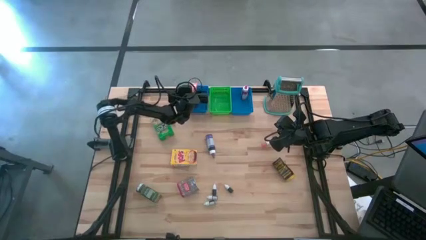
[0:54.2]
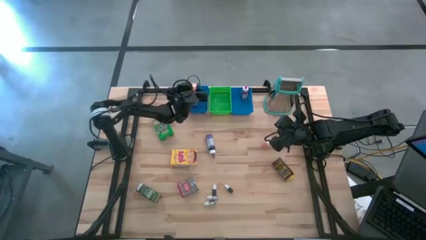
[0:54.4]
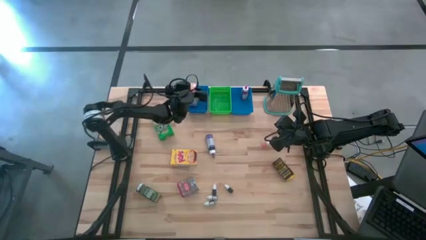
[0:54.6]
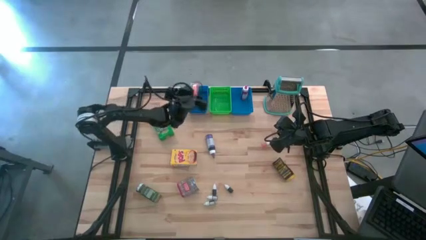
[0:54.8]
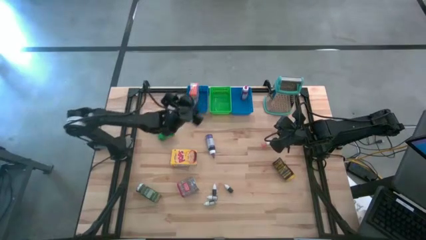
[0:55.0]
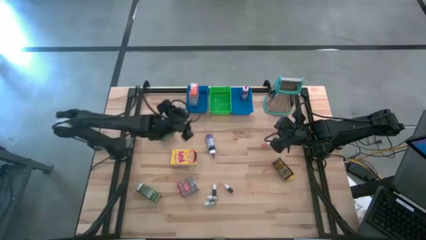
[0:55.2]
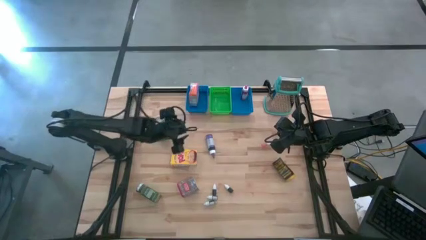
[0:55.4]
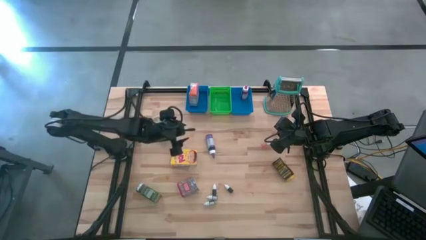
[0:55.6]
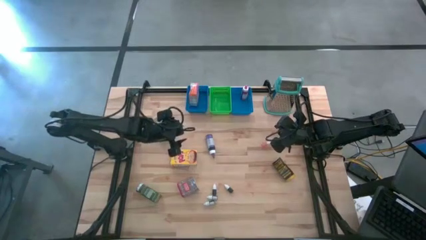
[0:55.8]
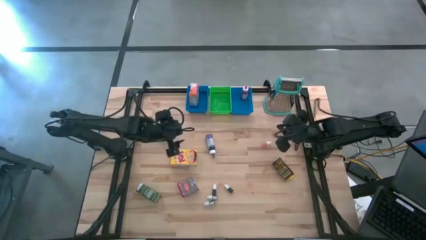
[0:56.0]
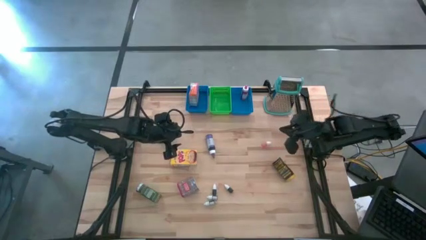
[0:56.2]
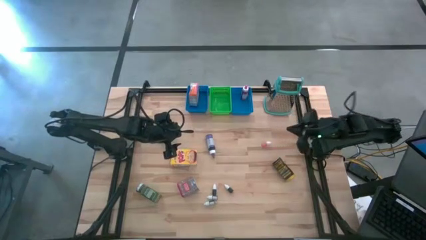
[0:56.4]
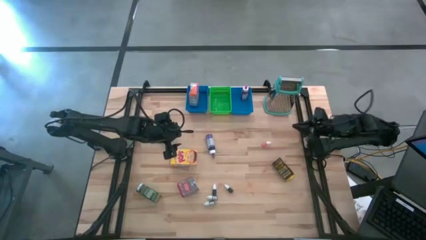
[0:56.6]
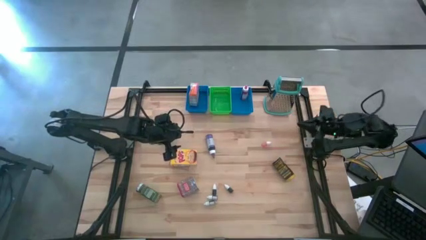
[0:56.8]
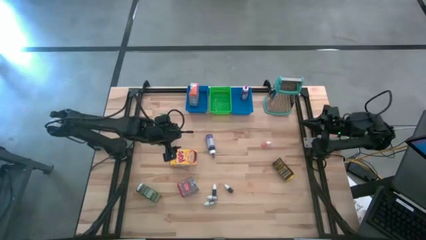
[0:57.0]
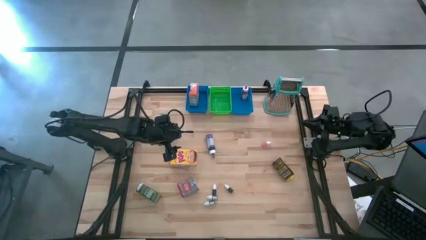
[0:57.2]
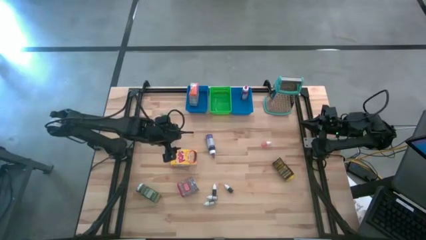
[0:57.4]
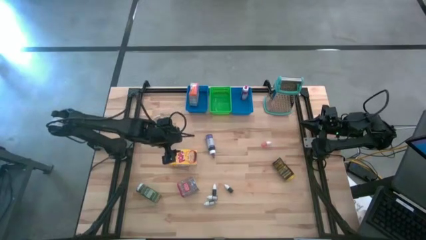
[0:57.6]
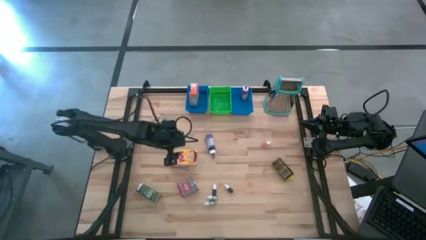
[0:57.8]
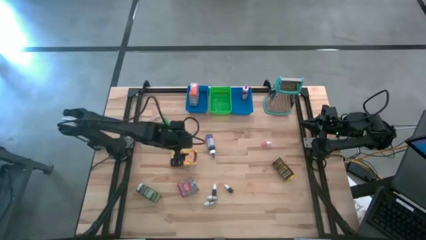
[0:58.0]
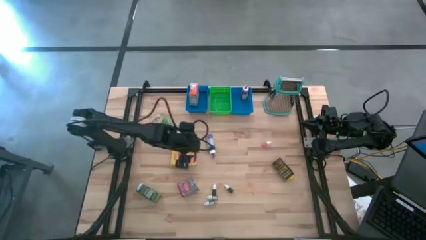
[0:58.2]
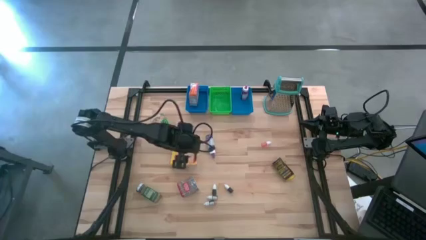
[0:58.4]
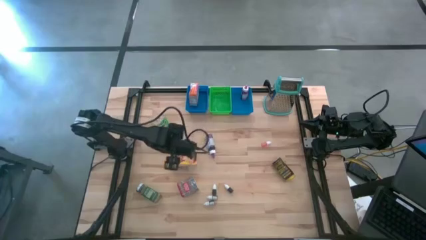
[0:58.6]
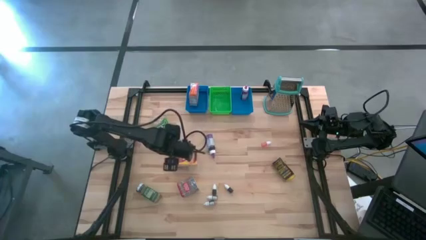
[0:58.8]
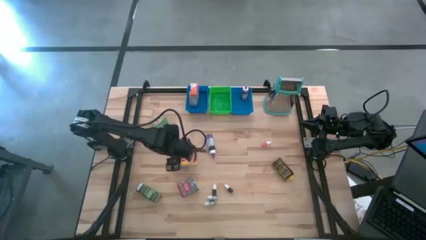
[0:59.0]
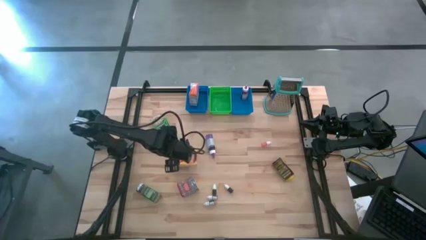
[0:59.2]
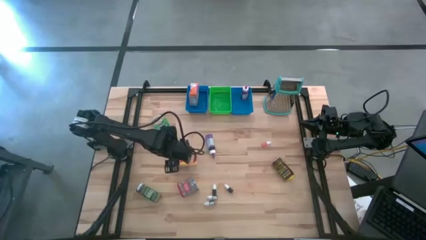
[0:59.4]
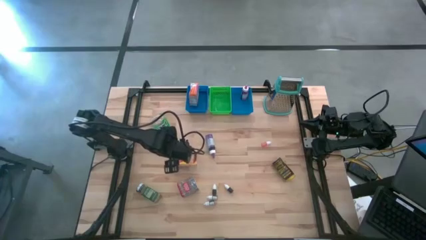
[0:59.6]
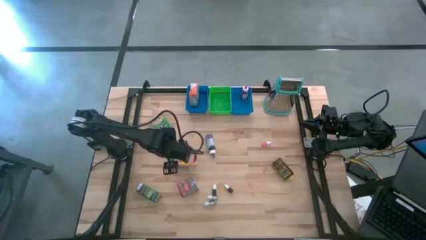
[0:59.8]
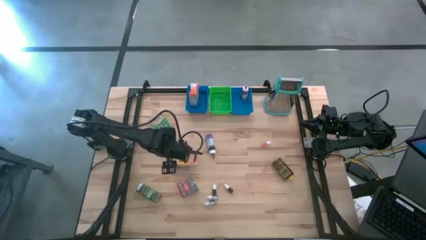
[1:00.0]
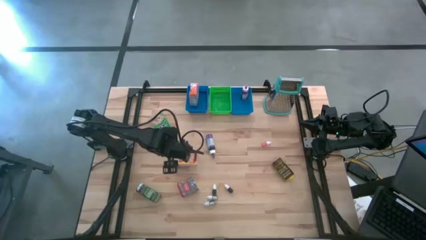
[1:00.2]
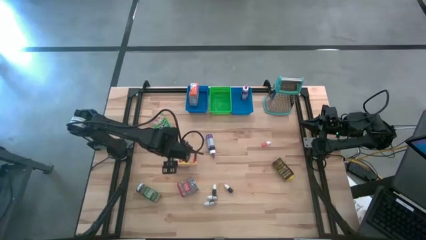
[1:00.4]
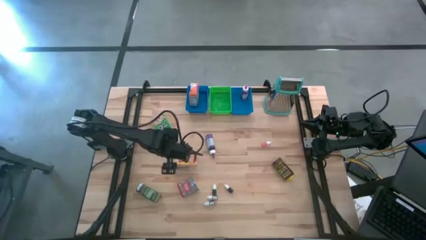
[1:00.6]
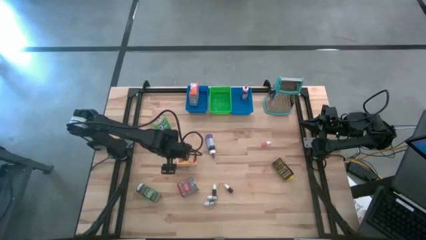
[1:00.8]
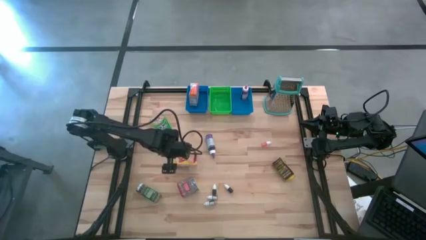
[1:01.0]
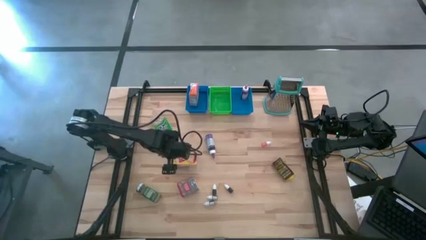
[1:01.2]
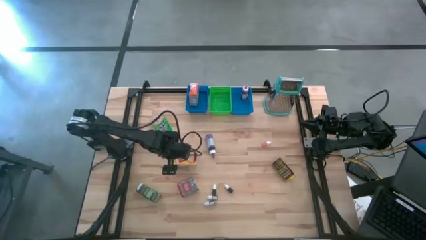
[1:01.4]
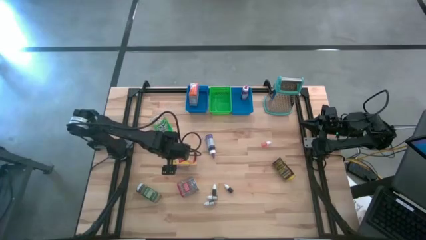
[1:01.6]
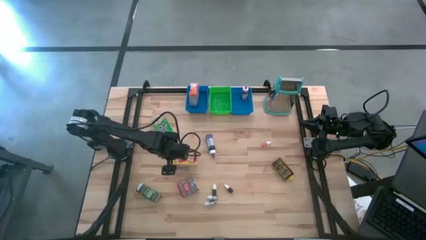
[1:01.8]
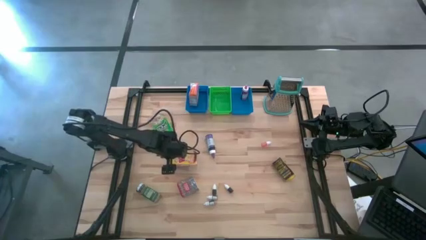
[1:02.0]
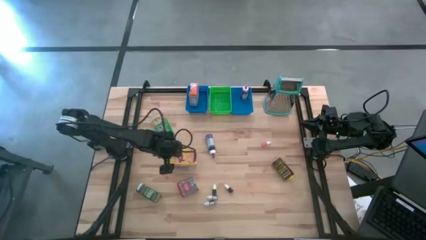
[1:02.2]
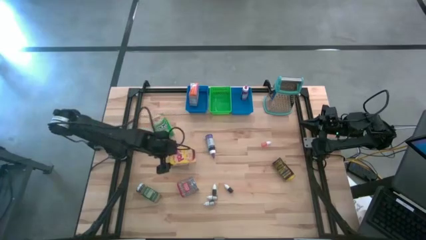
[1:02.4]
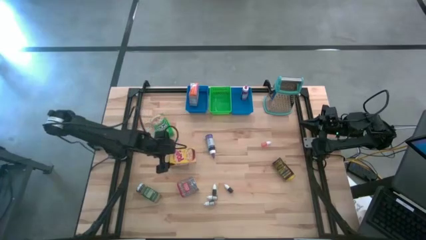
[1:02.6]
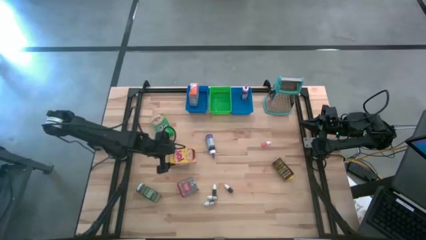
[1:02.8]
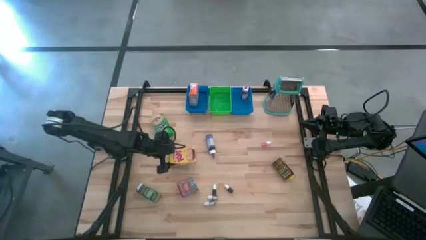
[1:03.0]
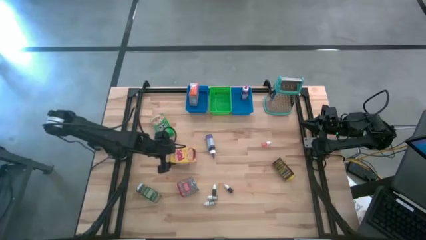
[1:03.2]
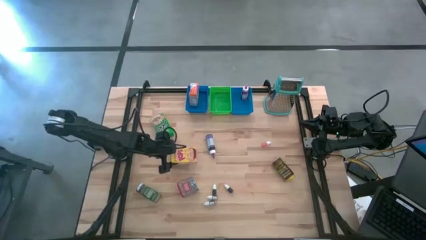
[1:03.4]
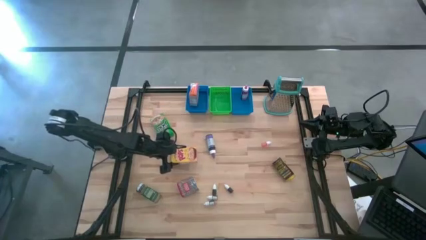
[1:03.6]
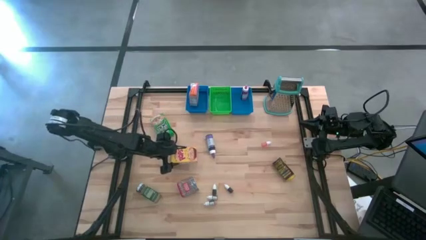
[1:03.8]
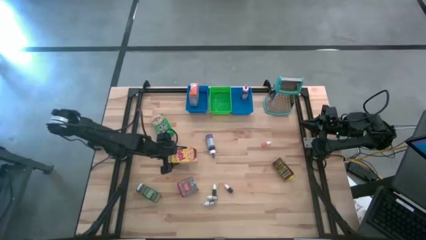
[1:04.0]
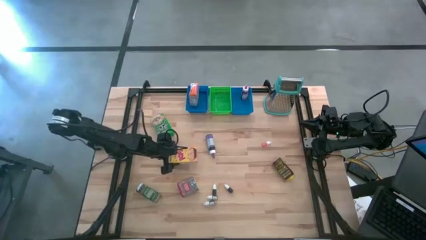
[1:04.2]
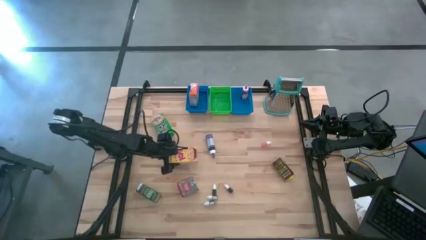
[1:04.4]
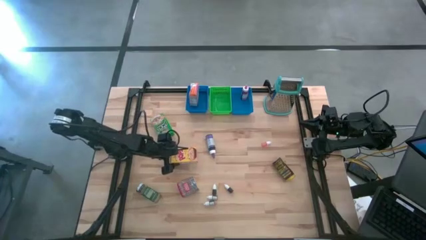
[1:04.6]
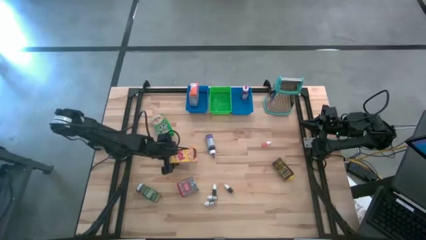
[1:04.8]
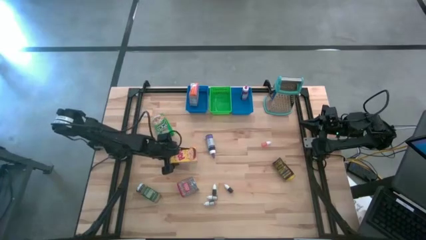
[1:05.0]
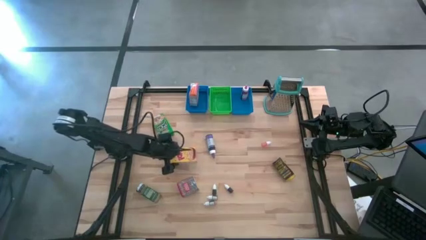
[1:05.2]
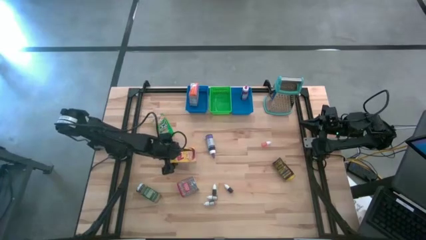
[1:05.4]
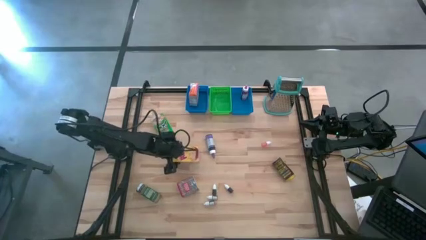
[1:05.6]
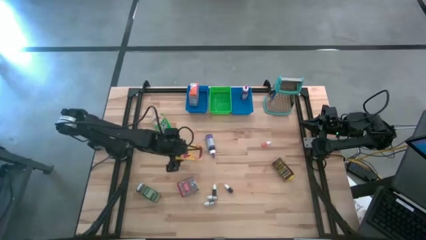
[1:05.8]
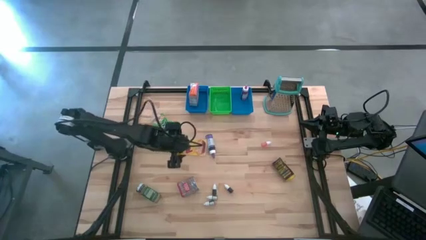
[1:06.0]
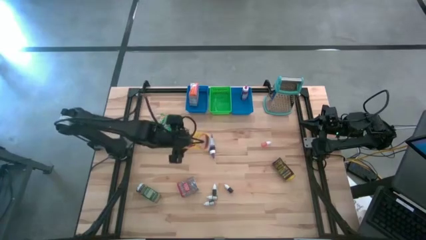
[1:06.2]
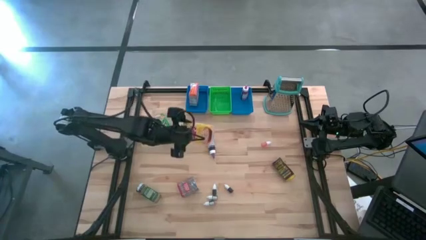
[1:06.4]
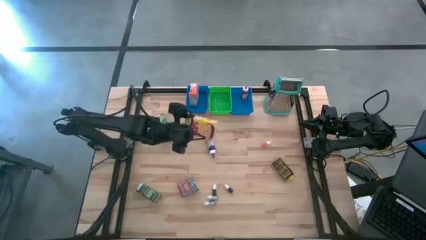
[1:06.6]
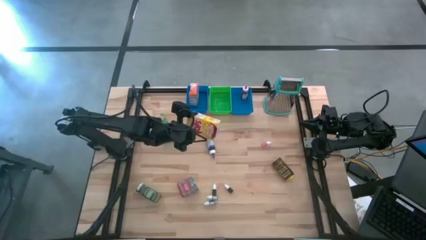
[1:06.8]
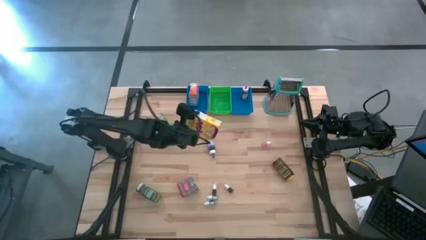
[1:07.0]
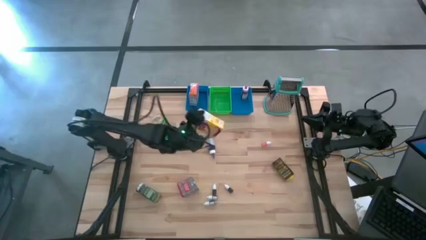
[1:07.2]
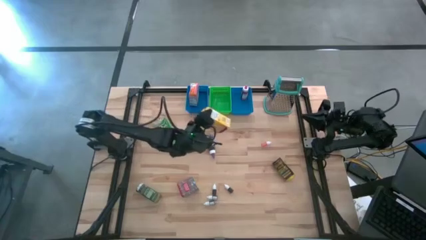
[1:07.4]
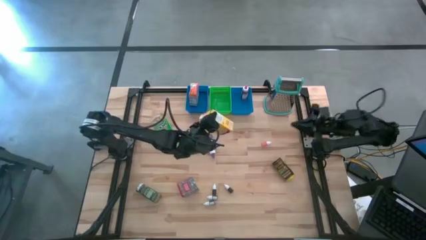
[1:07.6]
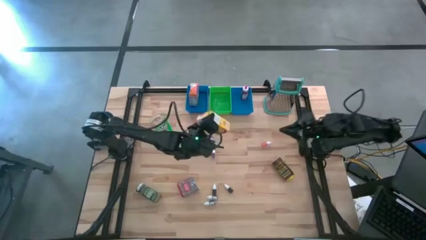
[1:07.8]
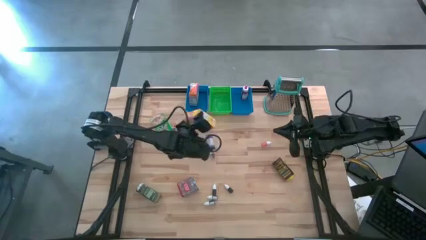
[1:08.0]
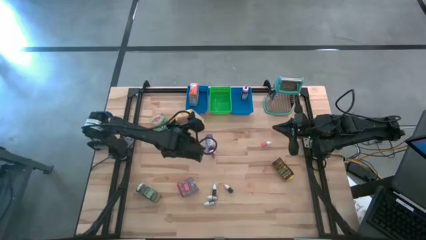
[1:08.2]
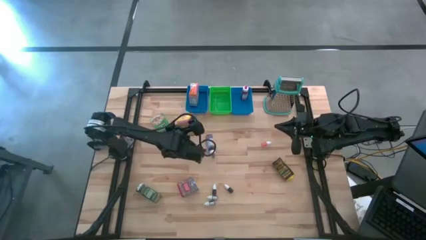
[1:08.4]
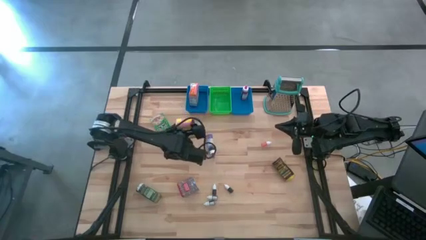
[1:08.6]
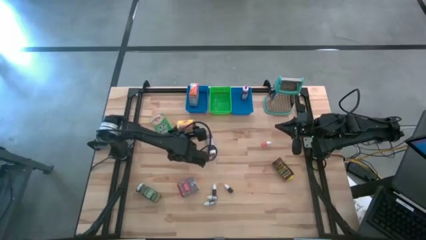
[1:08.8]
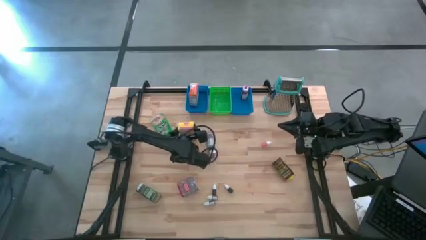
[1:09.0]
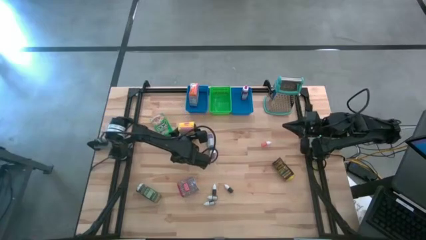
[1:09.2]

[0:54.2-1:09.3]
Task: Pick & Place Kitchen Items
Put the yellow cereal box into the left blue bin

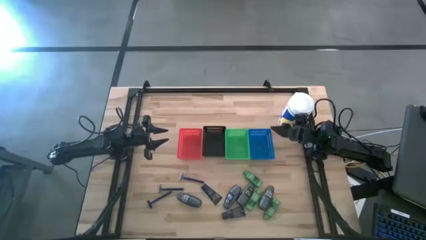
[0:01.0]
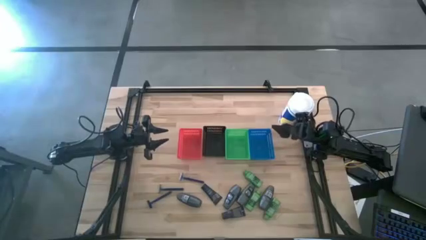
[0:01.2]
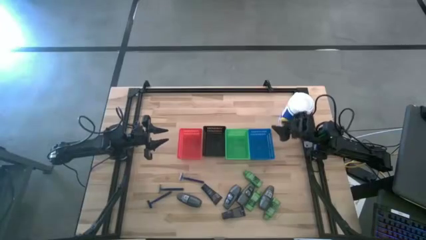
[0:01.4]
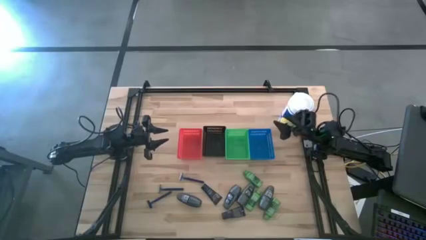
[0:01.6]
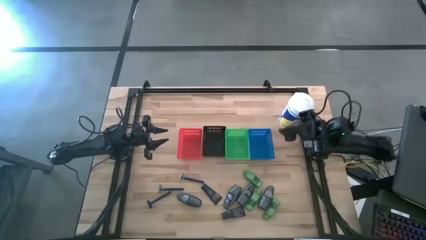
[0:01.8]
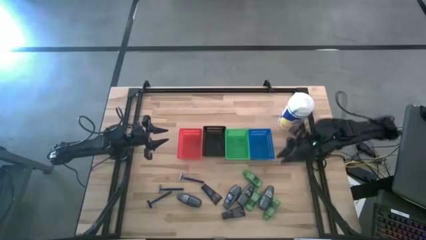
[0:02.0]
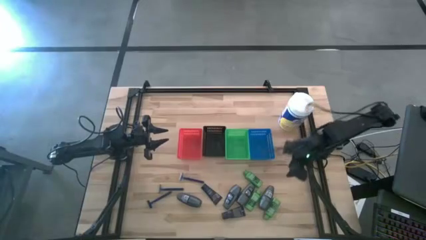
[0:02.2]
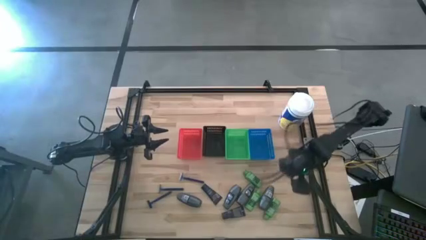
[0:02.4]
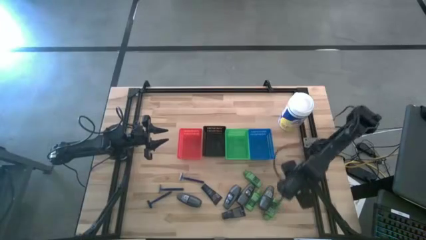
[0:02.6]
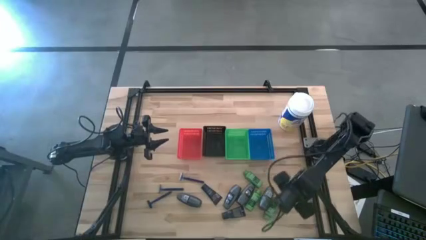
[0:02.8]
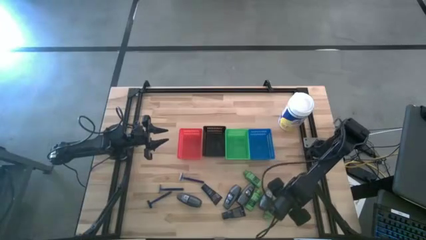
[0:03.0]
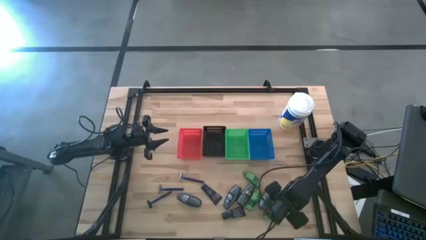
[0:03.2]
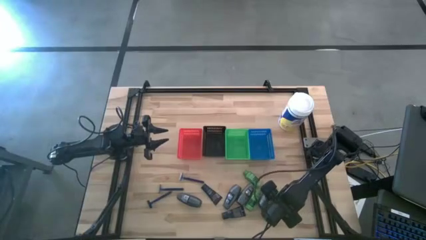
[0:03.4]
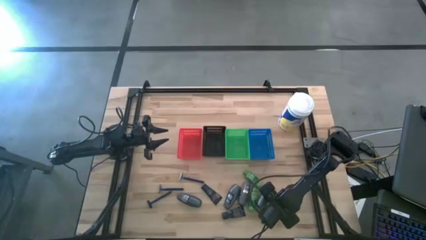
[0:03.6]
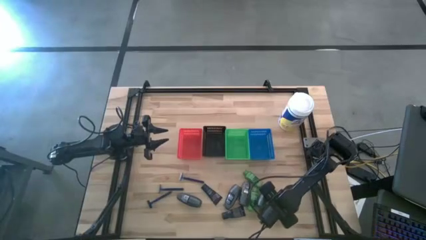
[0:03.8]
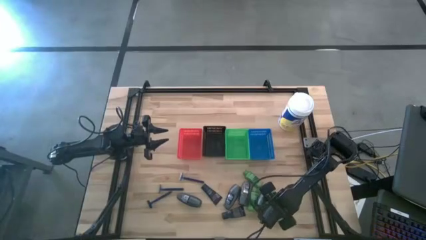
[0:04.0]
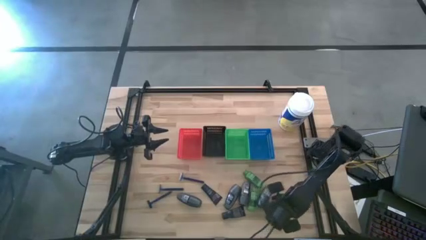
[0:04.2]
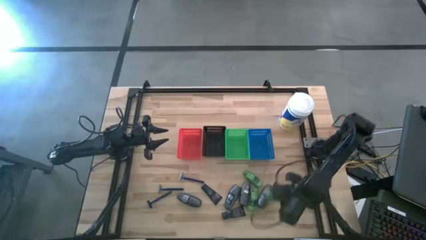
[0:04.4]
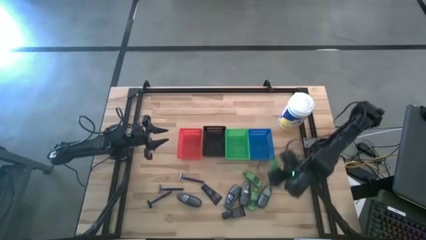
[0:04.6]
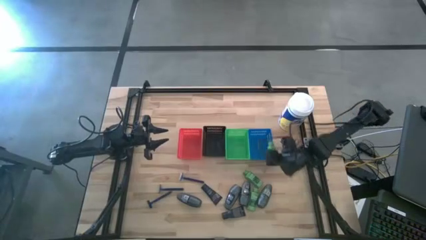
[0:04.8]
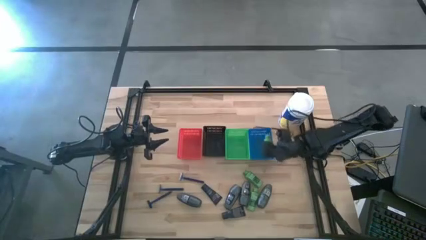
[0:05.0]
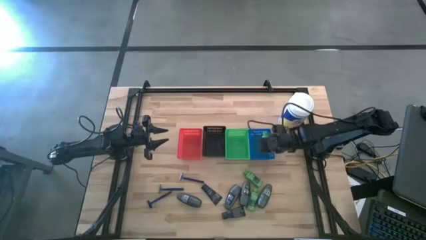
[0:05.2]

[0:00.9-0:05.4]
Task: Pick & Place Travel size toiletries
Put the green shampoo into the blue bin
